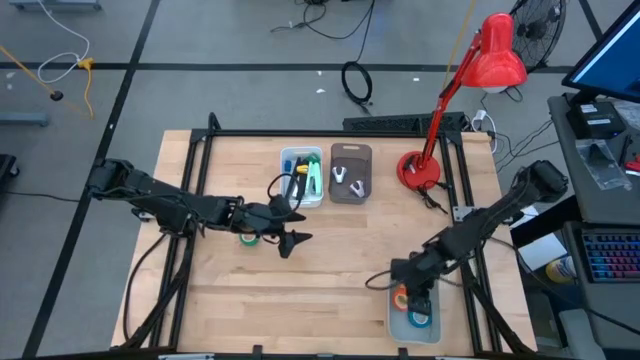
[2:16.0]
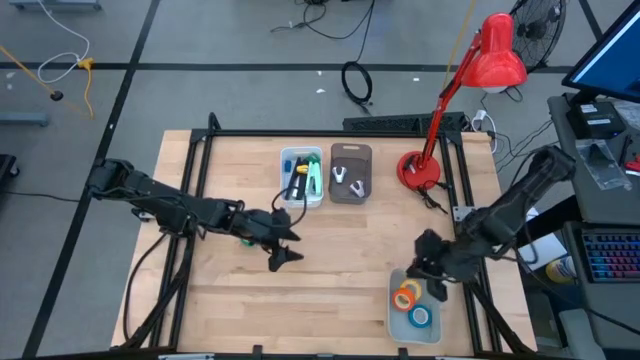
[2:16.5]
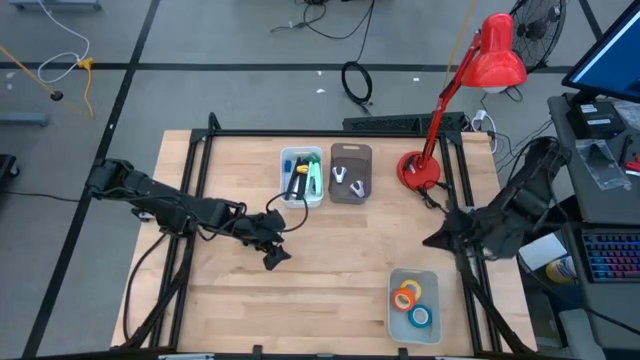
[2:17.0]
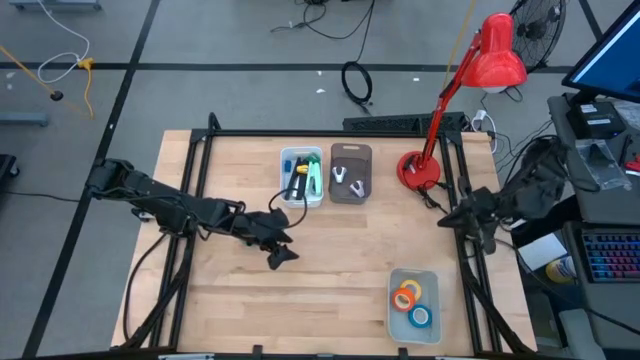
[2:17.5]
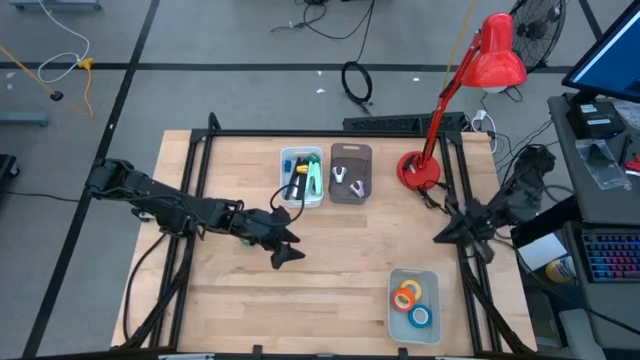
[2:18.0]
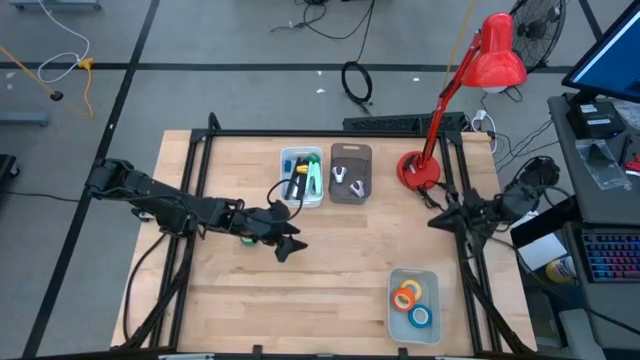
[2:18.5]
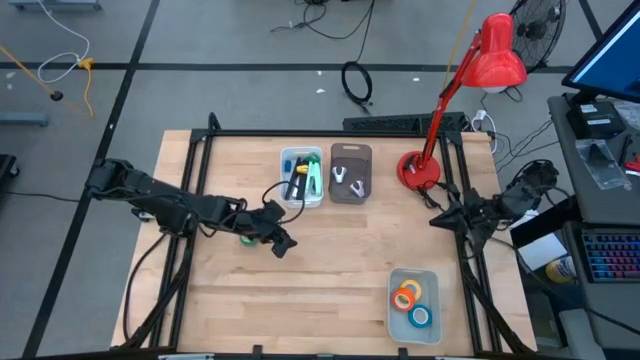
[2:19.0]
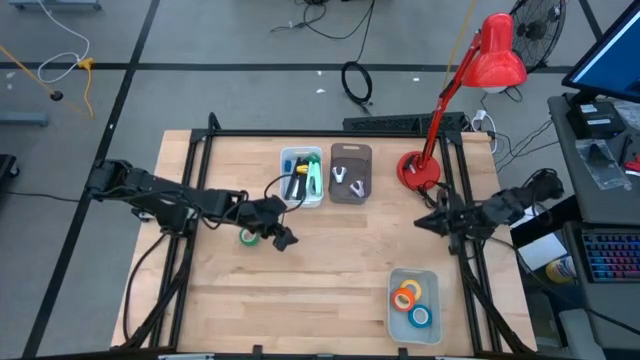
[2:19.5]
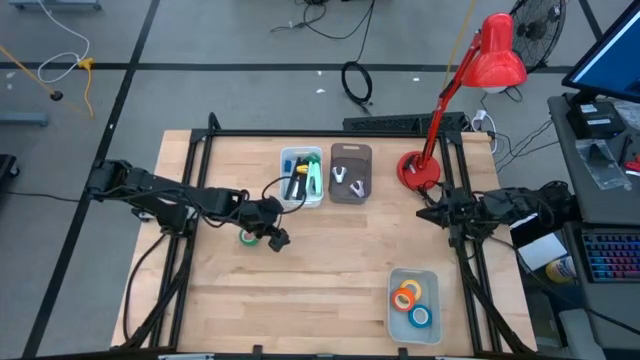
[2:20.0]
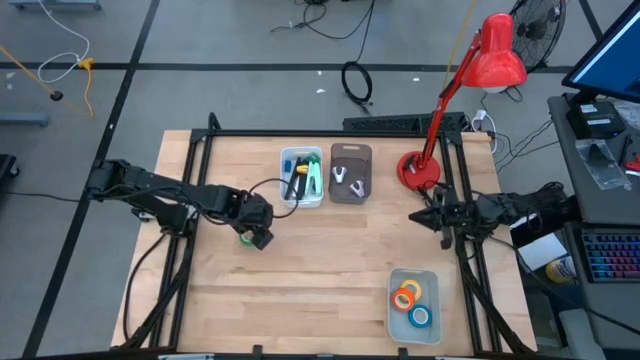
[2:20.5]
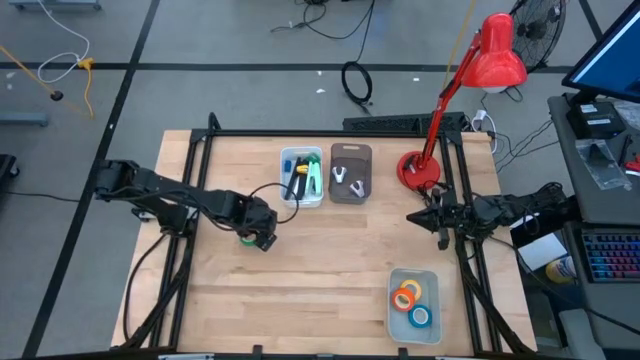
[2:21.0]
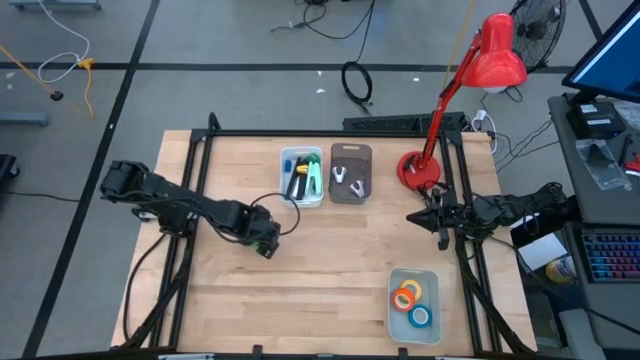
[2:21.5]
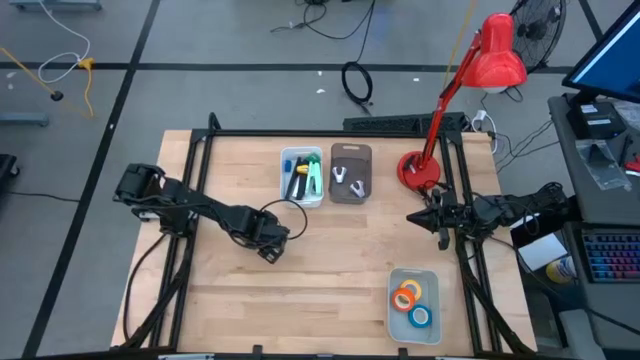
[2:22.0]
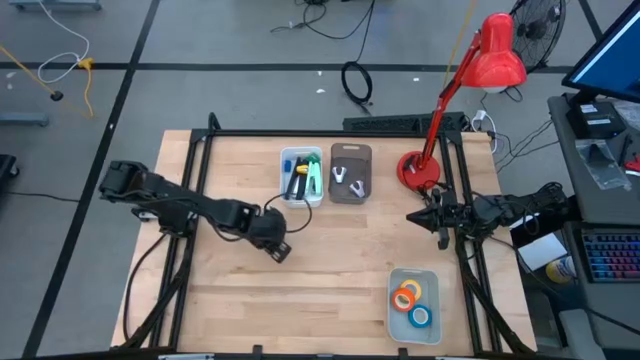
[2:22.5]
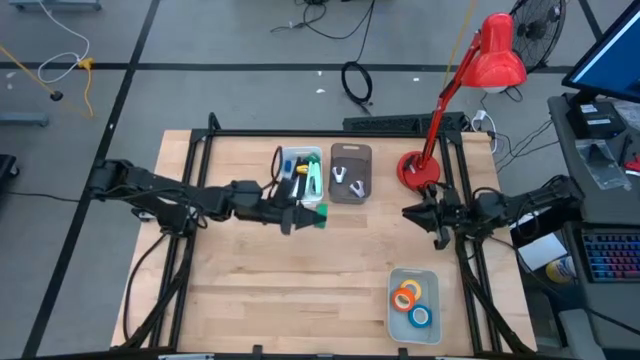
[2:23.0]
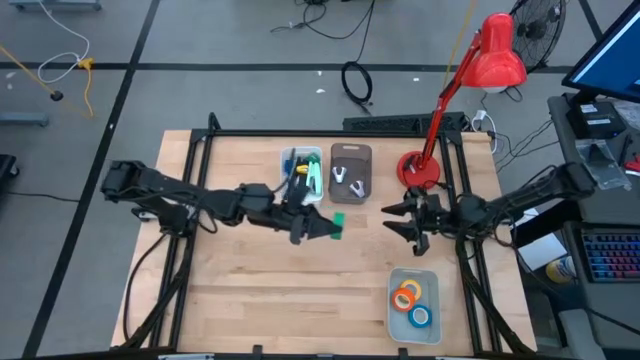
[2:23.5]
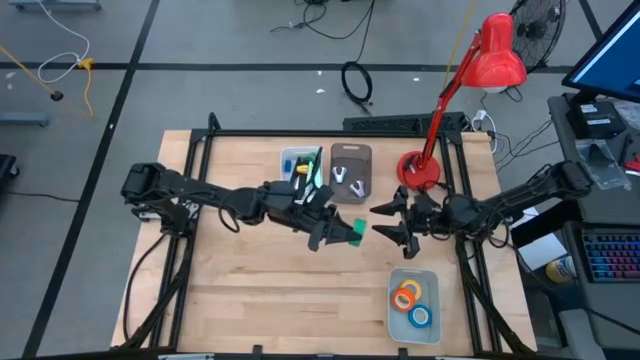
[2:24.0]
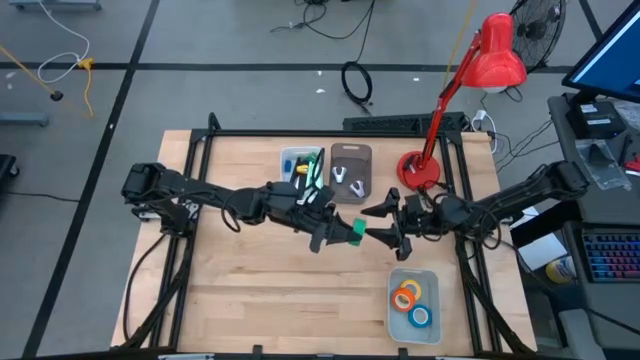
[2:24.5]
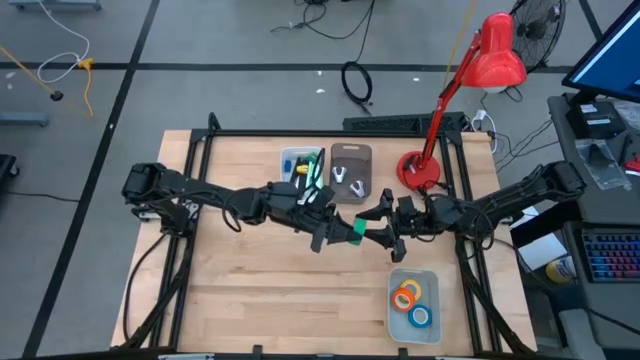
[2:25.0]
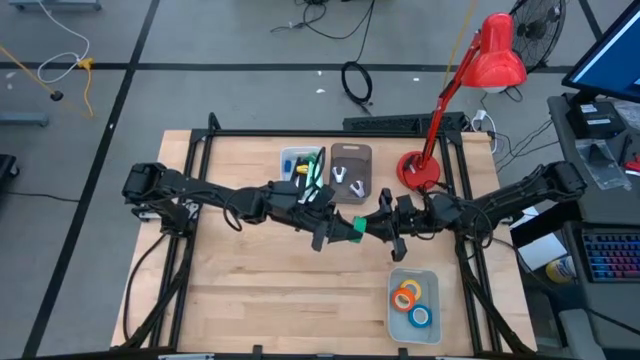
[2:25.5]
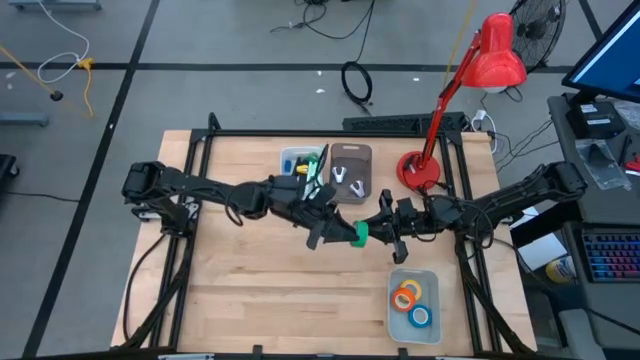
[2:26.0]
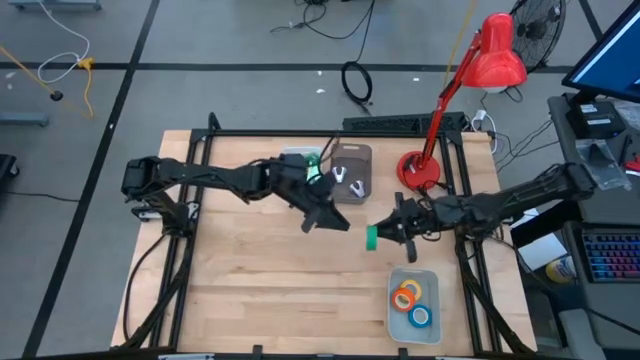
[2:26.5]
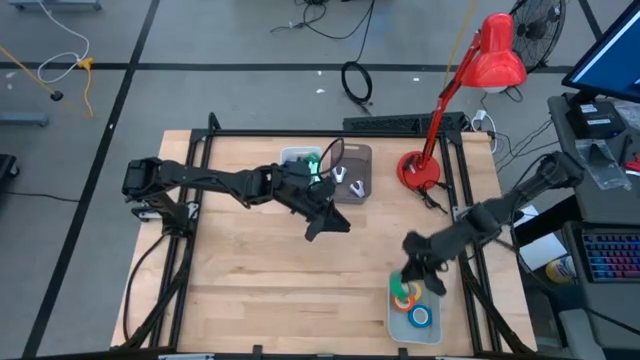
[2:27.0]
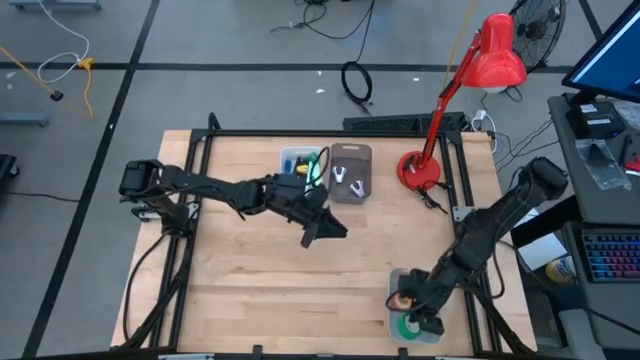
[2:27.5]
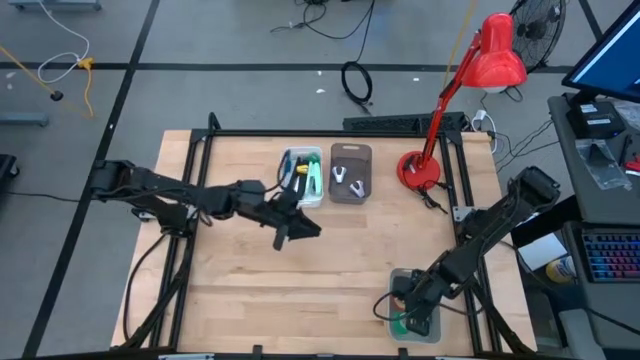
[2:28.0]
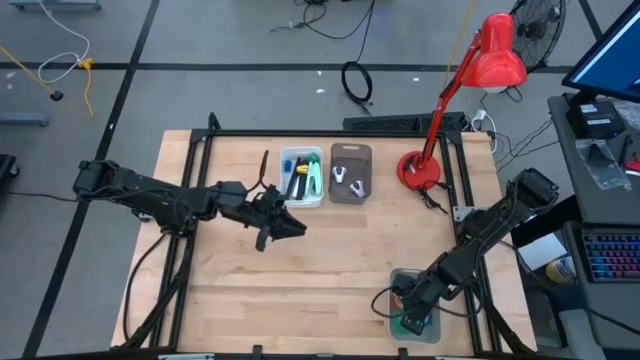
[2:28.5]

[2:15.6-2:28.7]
Task: Pick and place Stapler, Stapler remover, tape
Put the green tape into the gray bin

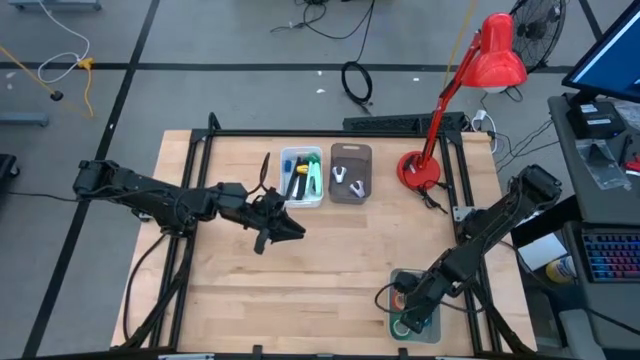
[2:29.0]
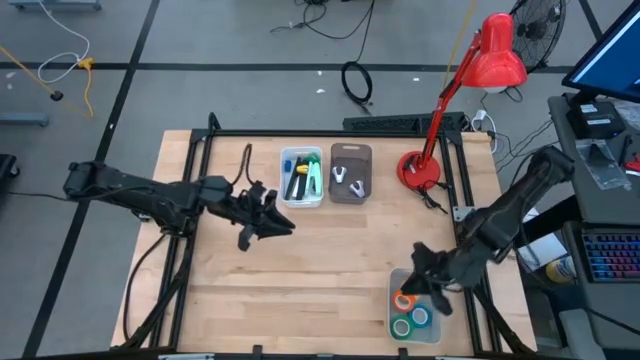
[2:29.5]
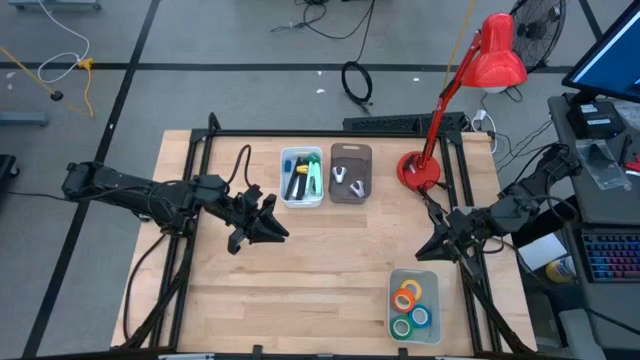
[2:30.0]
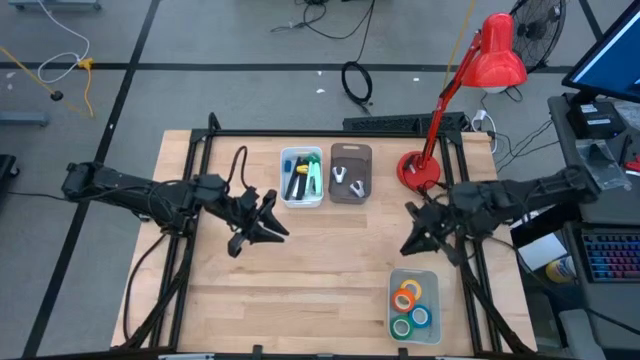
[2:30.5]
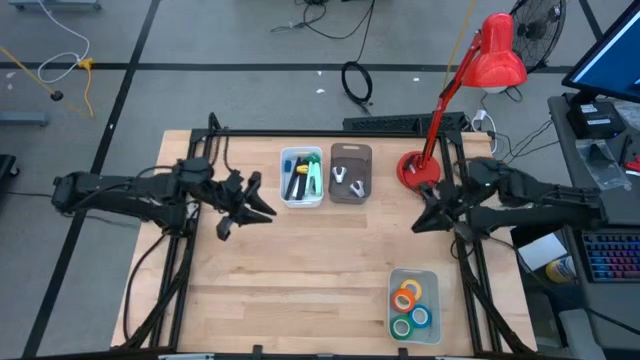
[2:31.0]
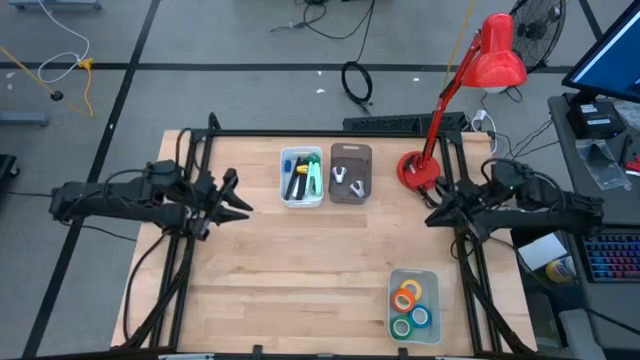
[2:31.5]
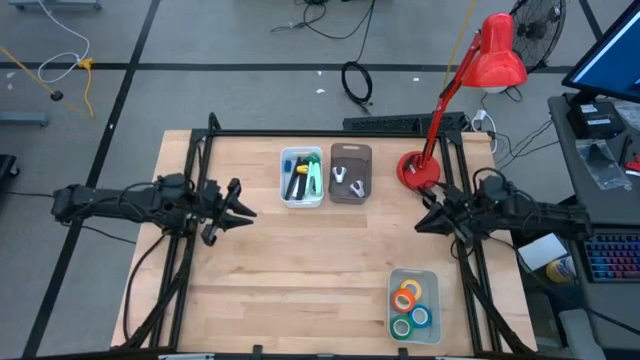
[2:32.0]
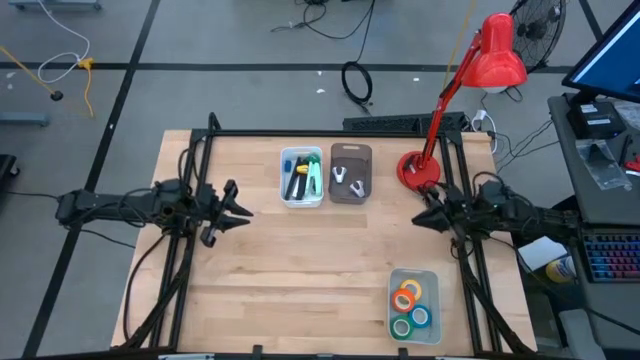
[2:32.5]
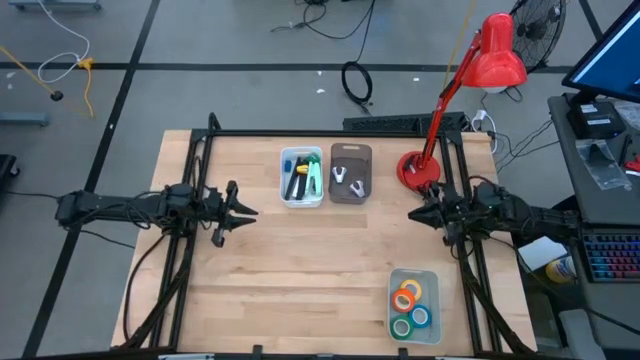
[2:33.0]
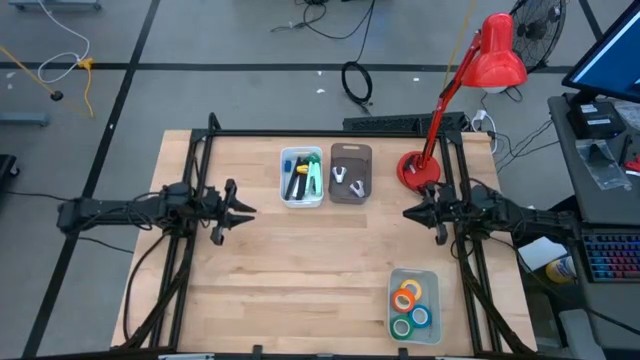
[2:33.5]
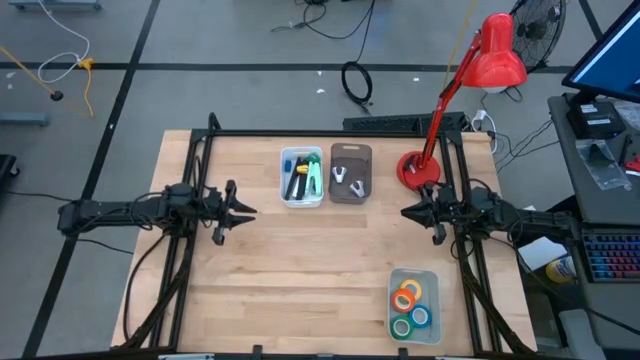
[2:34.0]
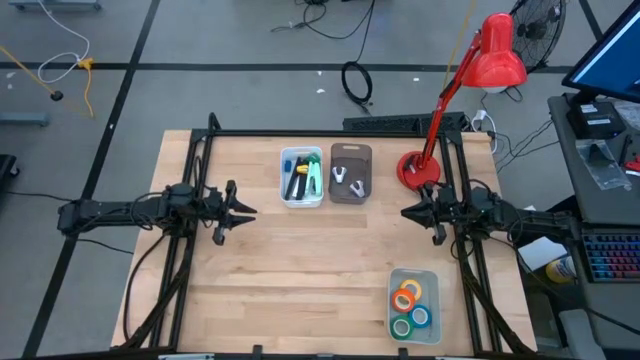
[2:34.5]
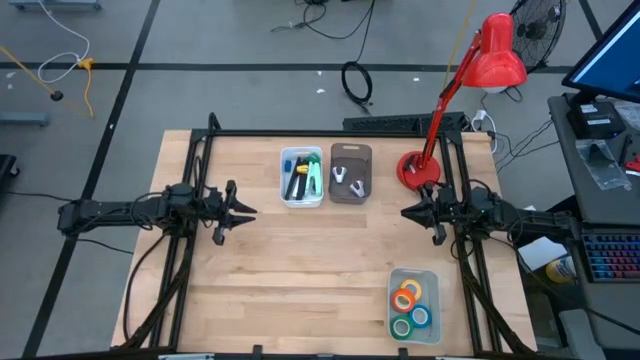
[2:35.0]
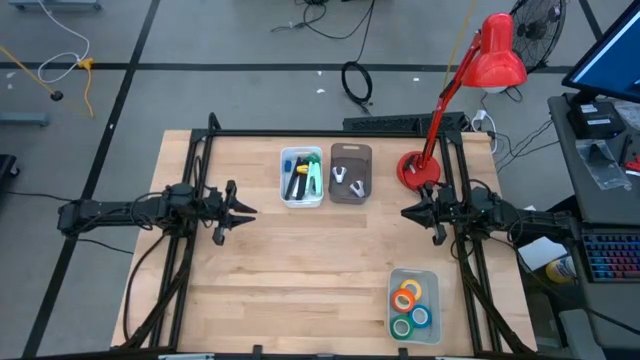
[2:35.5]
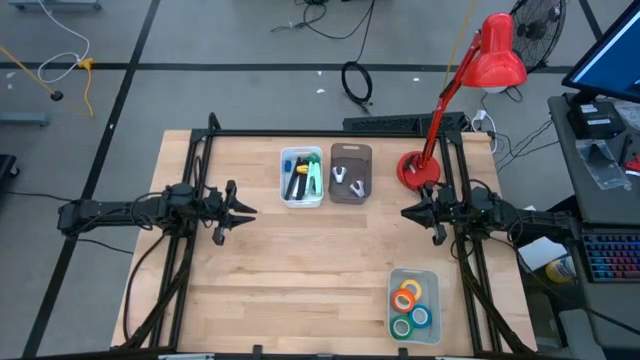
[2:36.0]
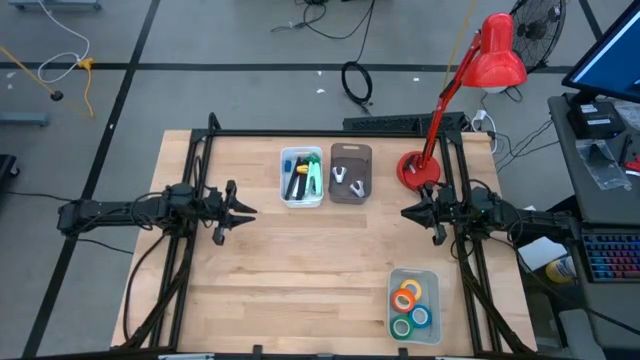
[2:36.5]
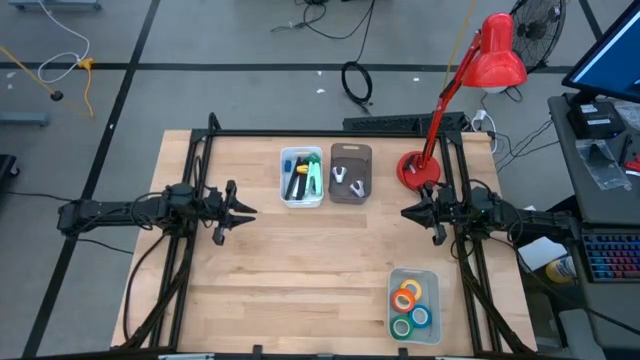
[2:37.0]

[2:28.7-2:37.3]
Return to Home Position
